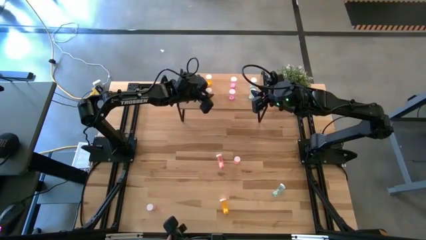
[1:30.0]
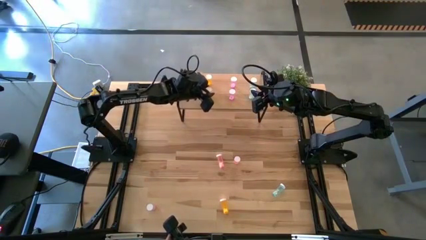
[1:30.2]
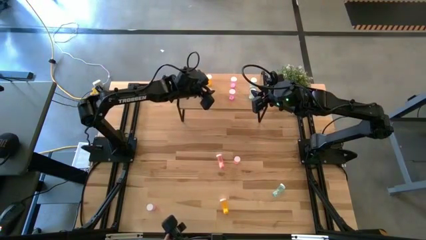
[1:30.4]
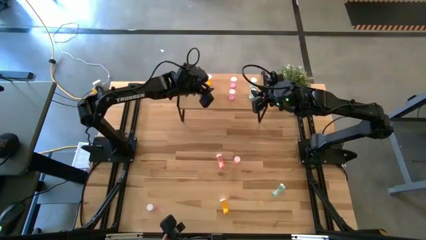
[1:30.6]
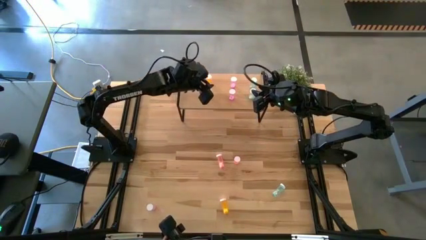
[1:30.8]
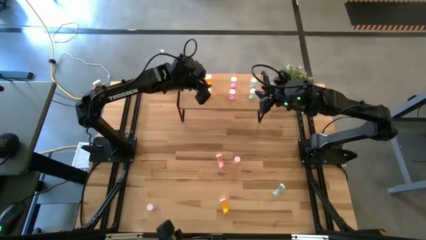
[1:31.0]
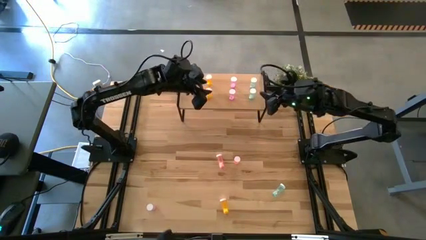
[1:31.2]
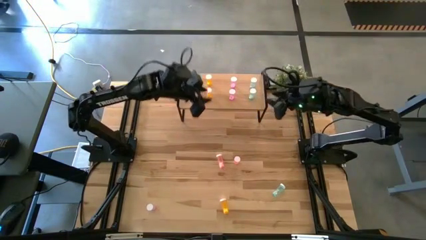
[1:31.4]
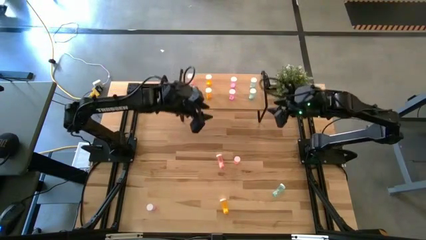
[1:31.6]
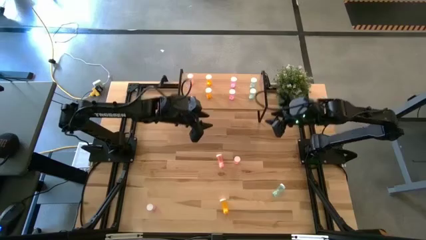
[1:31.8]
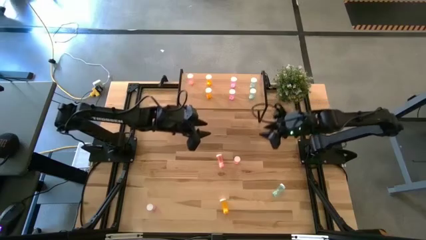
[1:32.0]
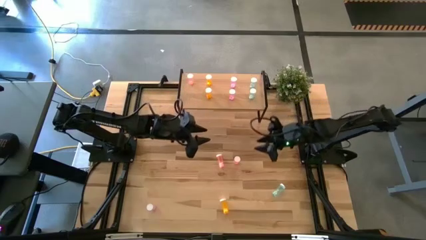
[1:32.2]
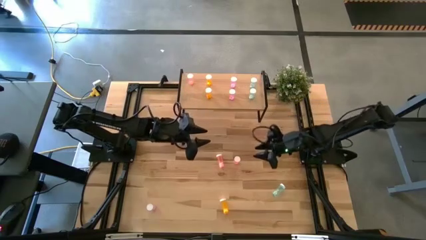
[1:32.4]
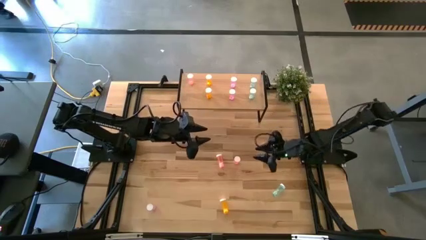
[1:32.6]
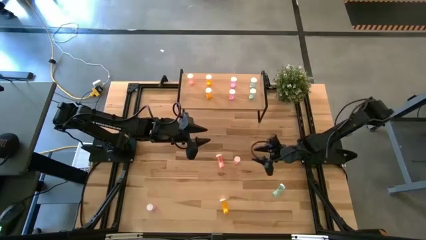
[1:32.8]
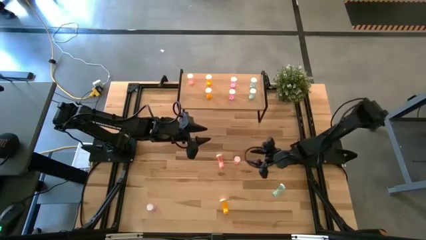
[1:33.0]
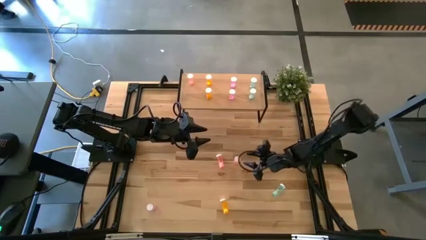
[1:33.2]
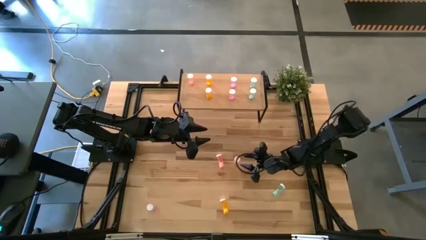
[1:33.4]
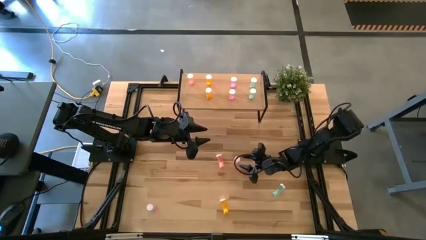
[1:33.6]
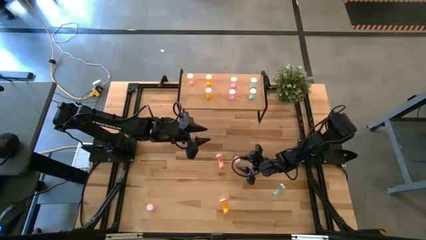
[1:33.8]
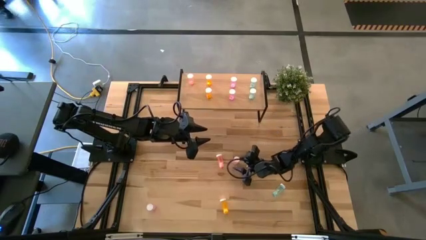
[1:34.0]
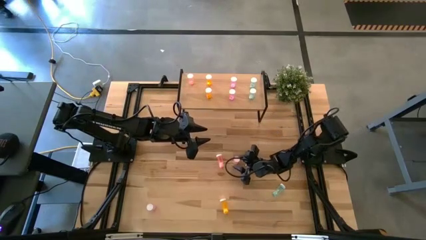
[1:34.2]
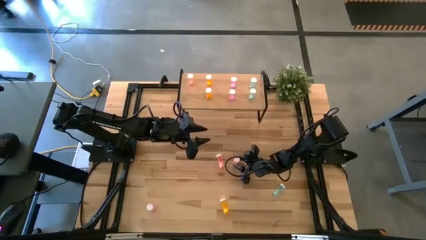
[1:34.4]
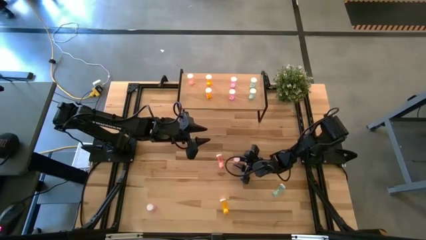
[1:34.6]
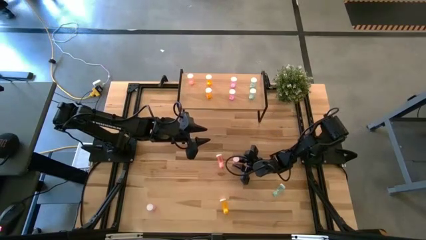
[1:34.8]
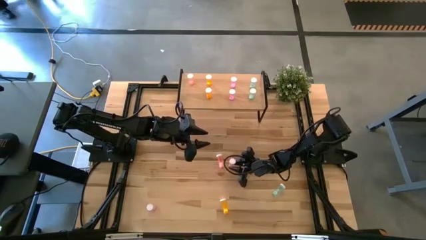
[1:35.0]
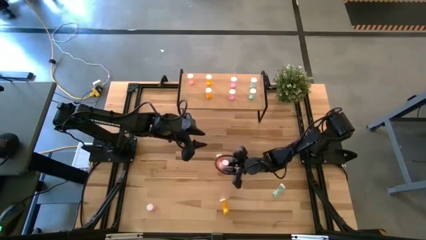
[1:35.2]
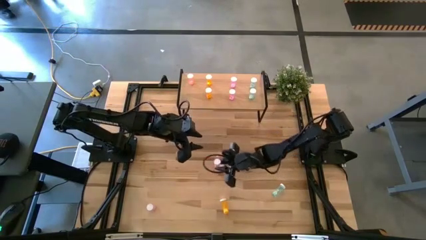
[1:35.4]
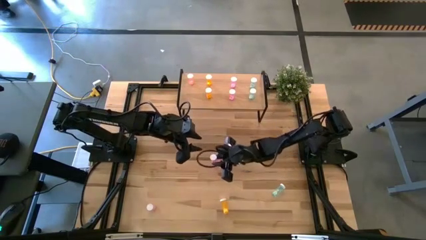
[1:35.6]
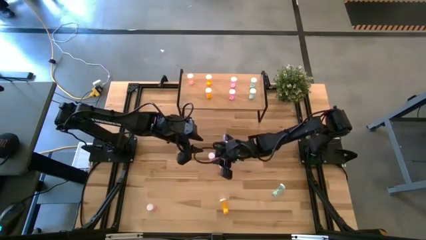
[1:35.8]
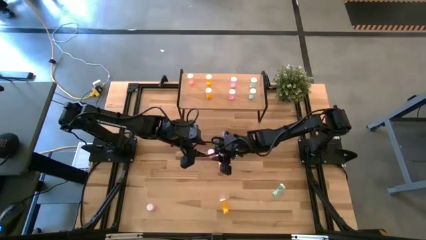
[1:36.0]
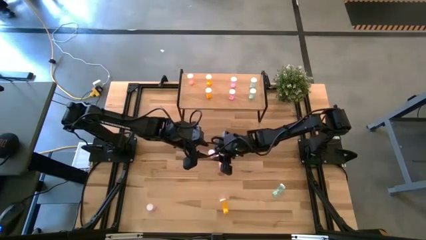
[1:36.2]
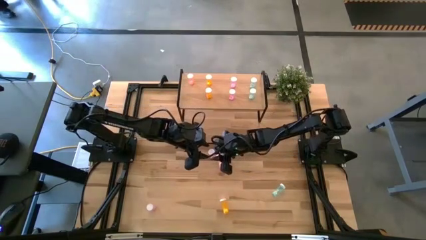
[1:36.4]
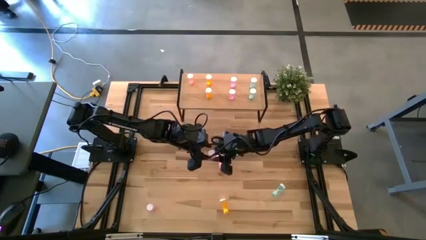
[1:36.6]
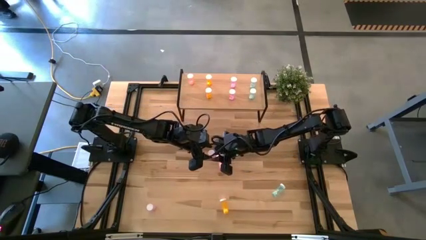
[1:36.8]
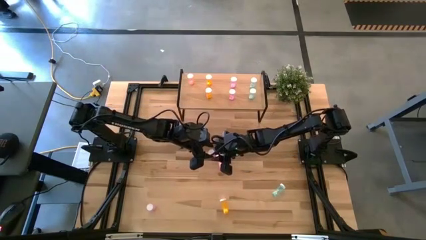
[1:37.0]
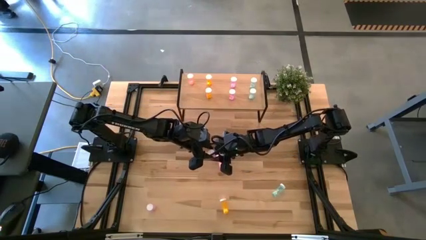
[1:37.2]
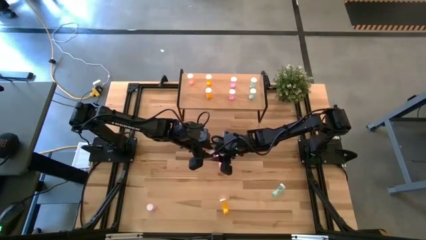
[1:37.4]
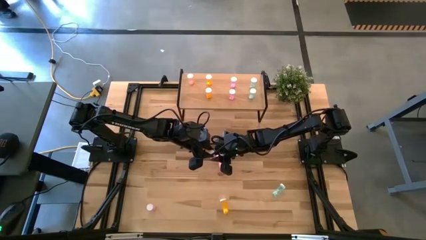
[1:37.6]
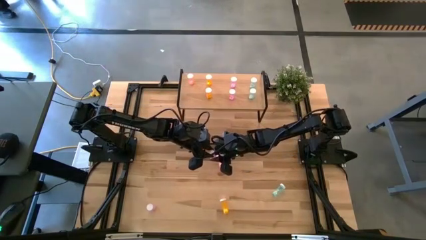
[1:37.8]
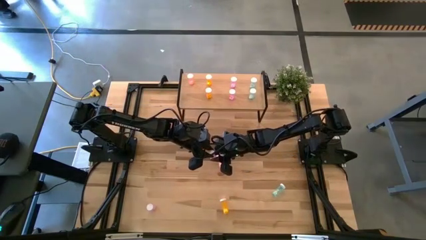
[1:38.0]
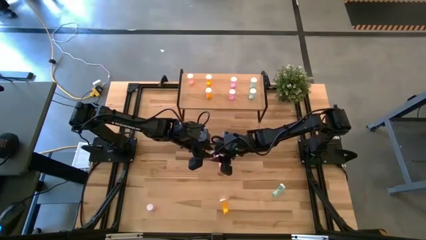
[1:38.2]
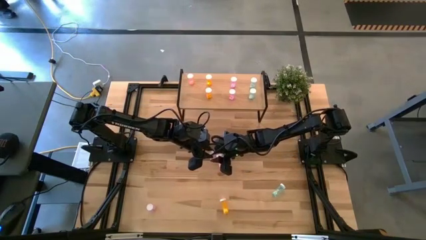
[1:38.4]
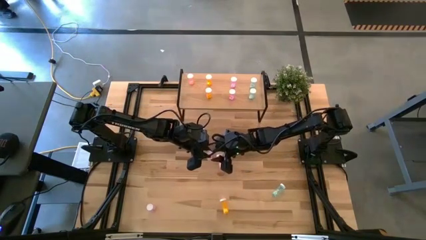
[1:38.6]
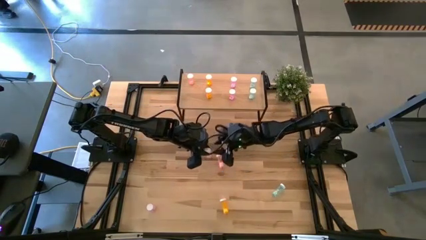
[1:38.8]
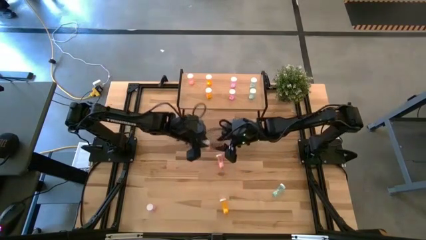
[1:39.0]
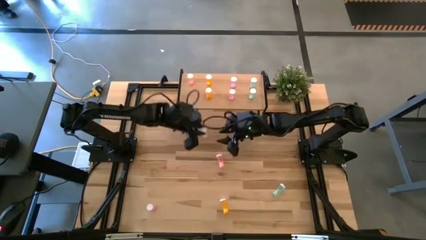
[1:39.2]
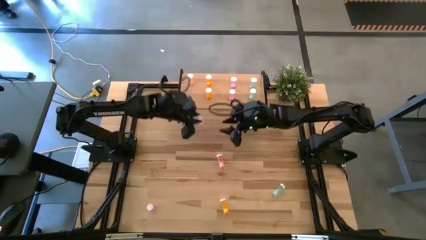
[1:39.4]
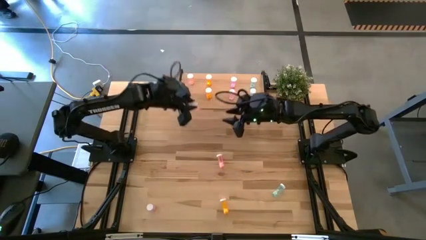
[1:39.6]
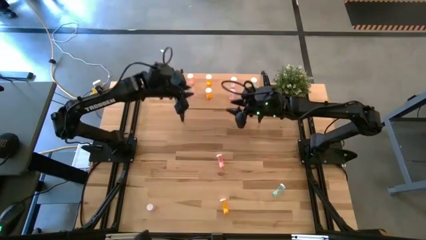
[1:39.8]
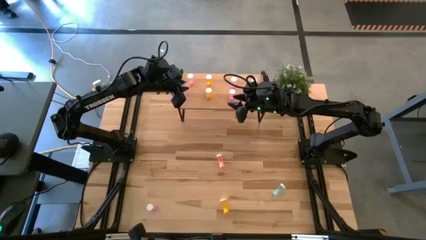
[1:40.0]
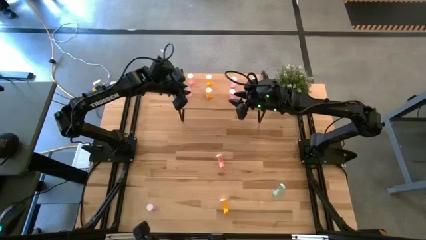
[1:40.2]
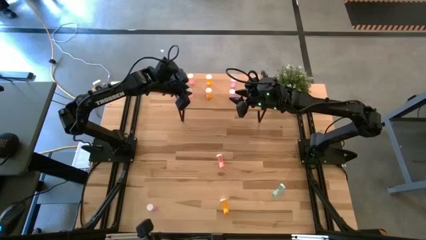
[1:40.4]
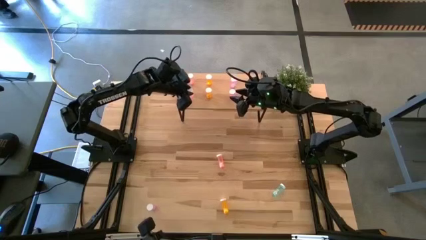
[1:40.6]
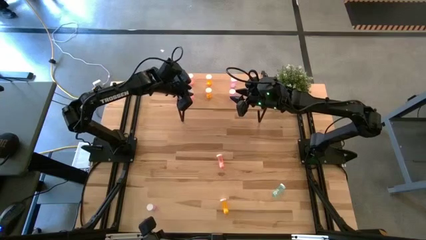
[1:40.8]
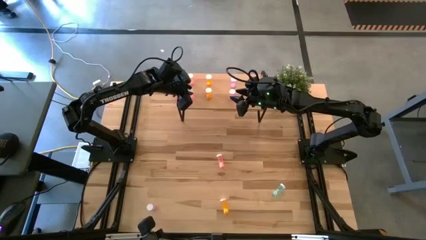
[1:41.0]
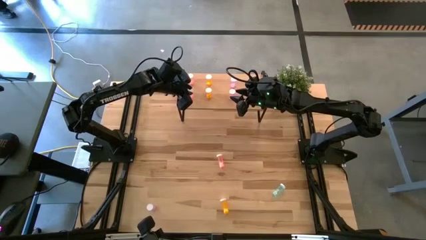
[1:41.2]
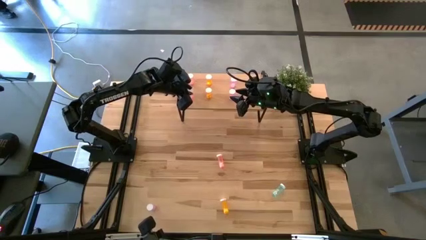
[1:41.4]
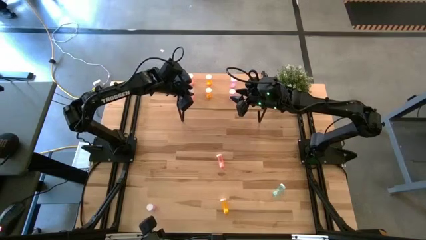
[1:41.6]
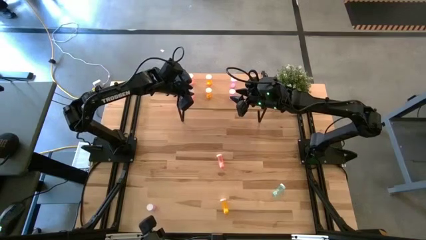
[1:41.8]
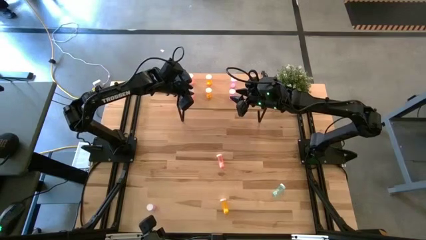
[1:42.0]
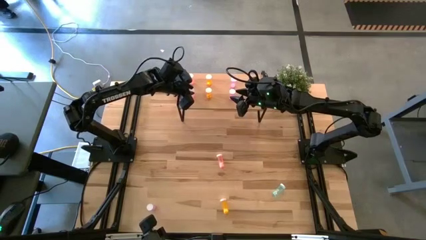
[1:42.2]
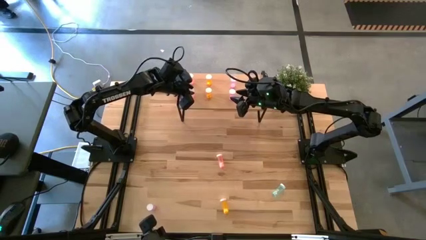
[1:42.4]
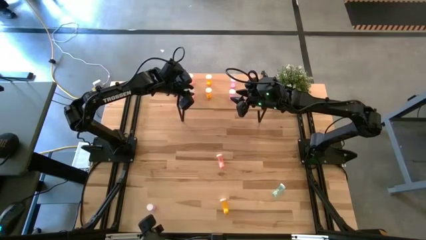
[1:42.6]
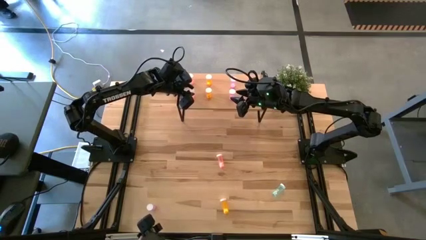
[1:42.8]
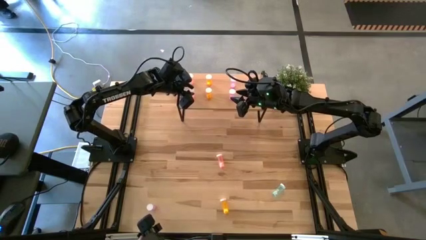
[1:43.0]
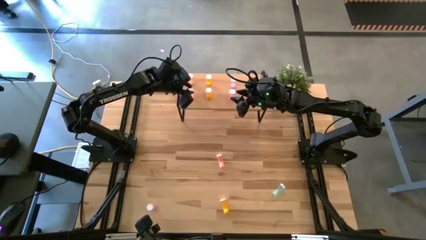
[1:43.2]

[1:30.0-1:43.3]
Task: Pick and place medicine bottles onto shelf by color
Put the right red pill bottle on the shelf aligned with the other red pill bottle

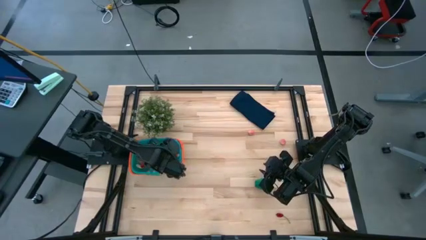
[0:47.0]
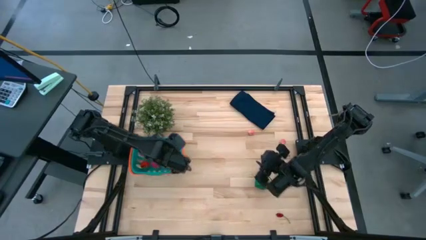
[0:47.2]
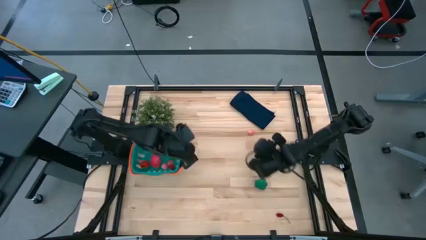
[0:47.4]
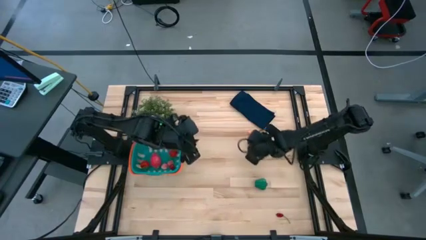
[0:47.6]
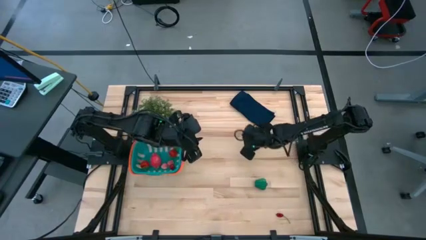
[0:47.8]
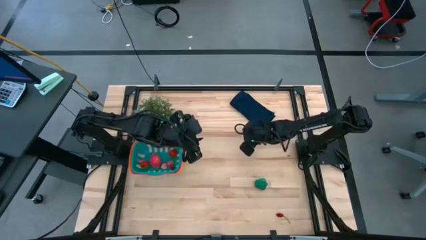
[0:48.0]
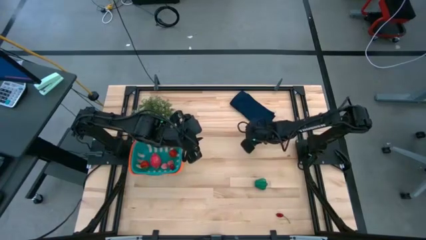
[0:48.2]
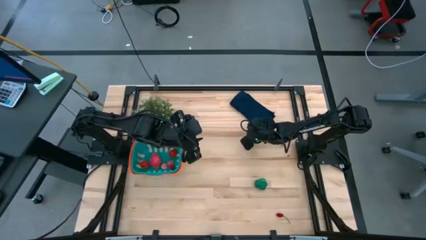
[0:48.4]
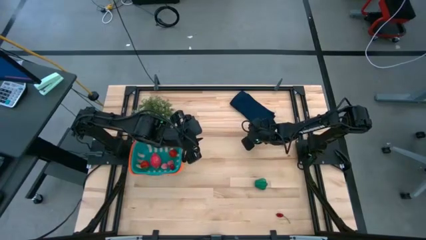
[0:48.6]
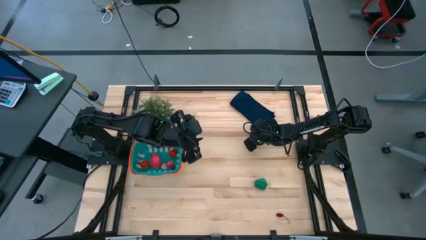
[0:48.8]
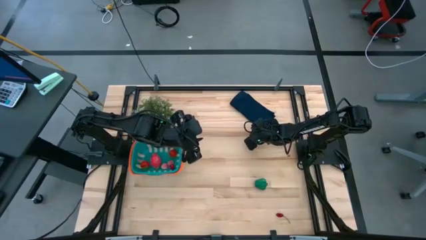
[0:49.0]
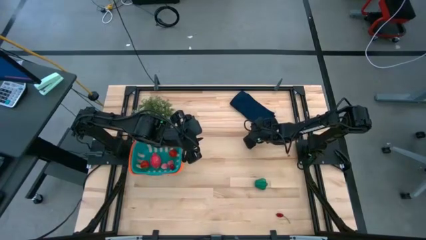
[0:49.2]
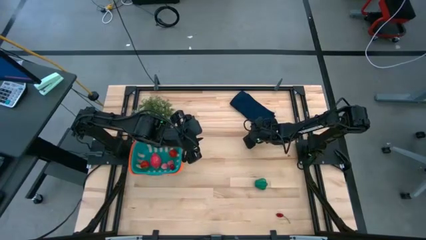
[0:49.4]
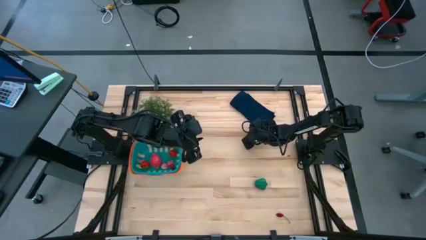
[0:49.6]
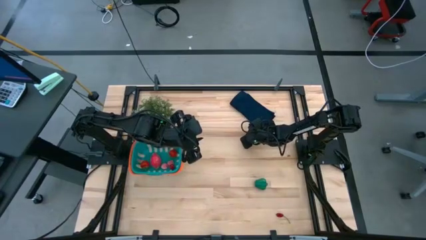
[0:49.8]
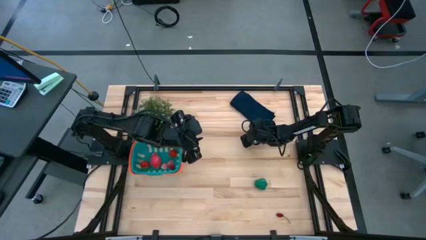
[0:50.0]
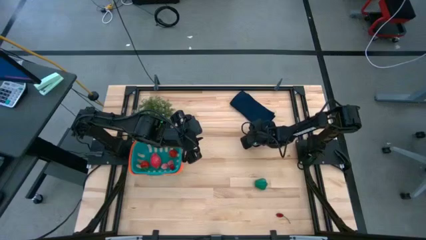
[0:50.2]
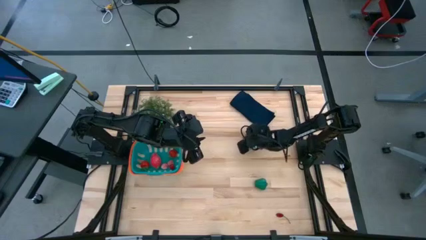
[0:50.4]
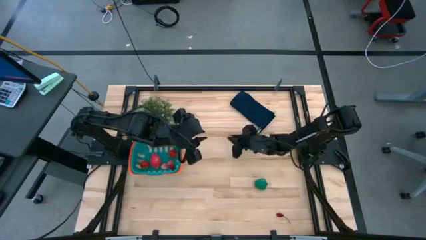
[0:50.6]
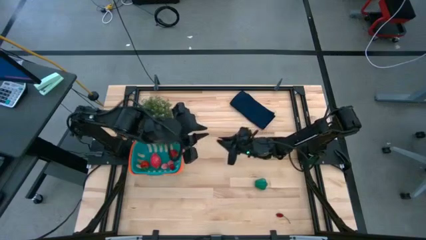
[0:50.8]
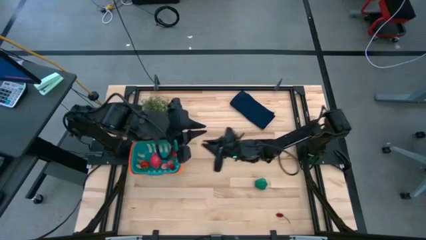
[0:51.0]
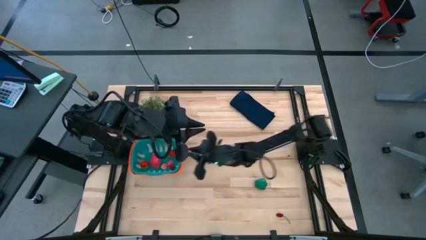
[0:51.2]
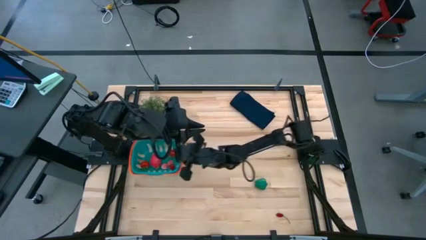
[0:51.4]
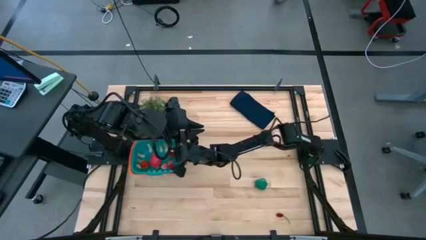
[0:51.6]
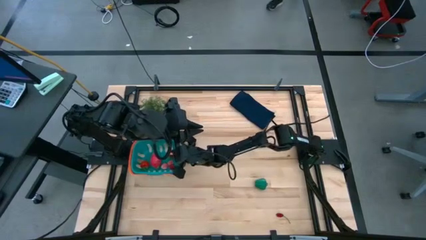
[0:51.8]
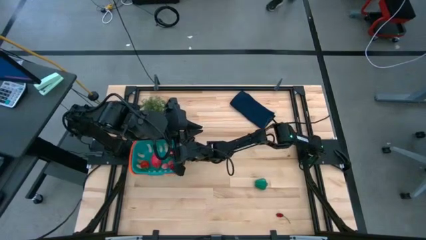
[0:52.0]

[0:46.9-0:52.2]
Task: Pick and placing Produce into tupperware
Put the peach into the green basket
